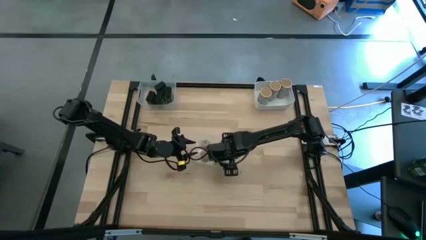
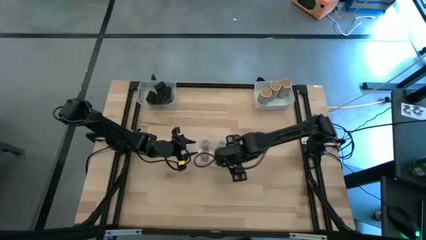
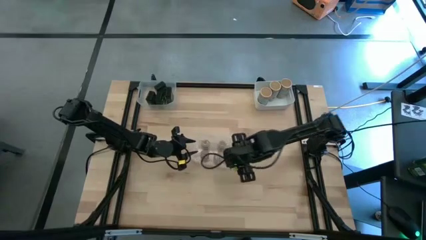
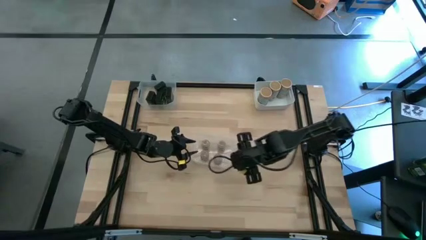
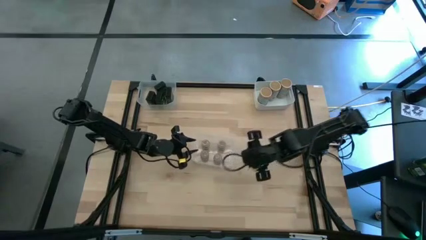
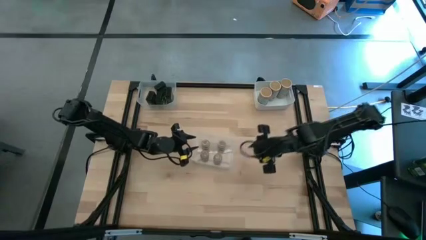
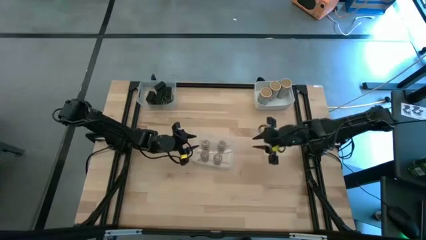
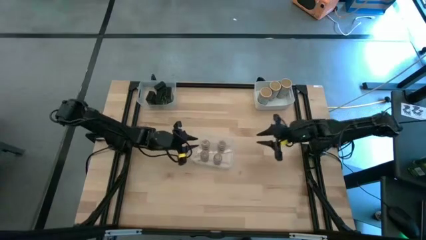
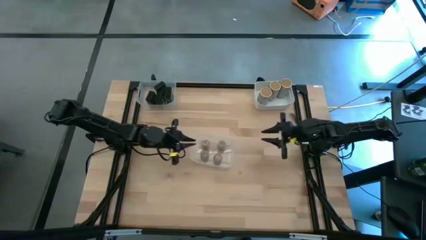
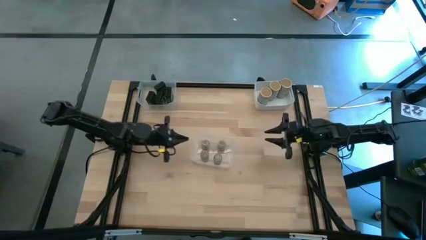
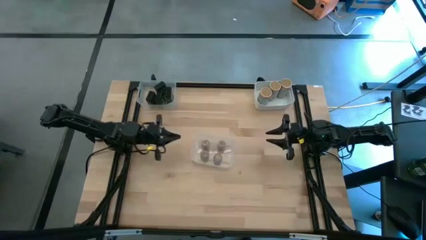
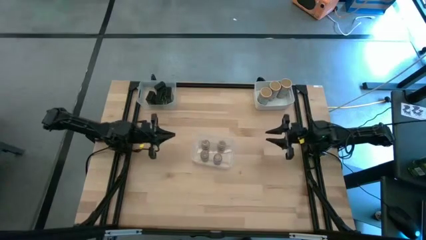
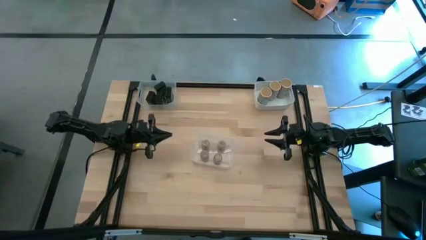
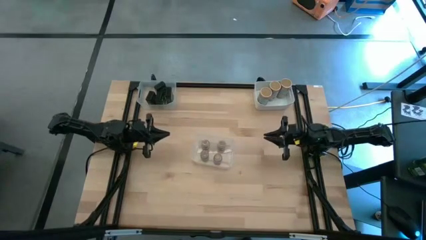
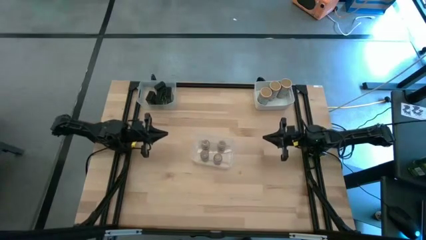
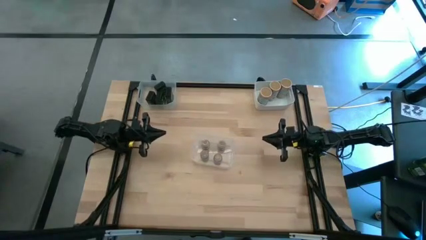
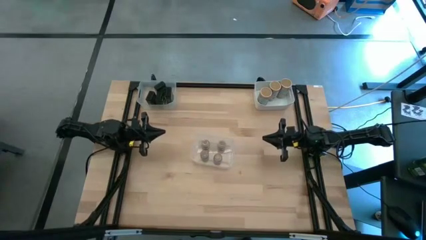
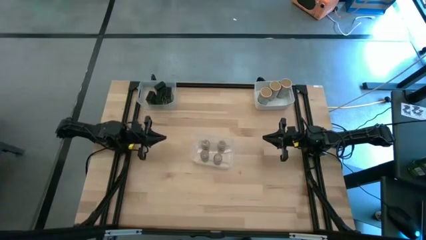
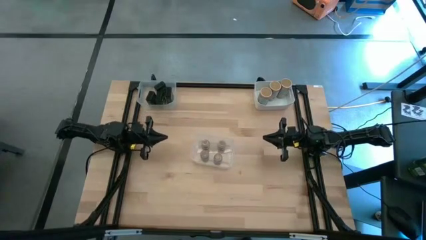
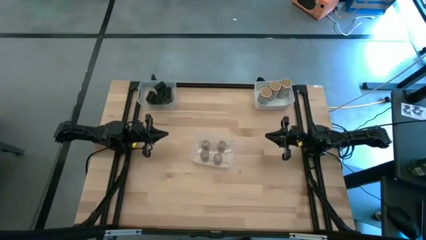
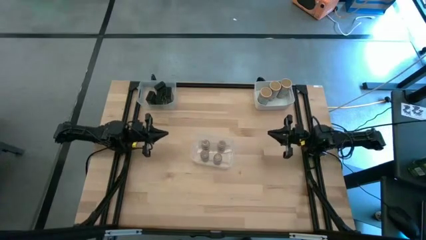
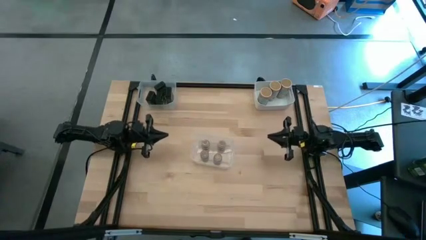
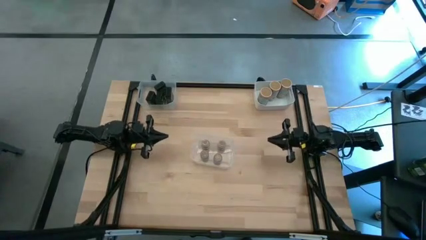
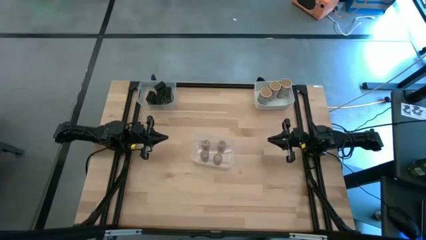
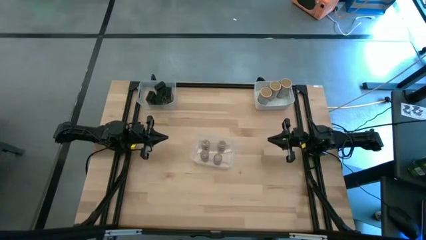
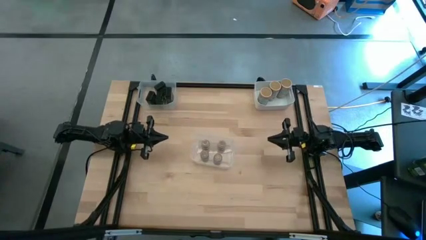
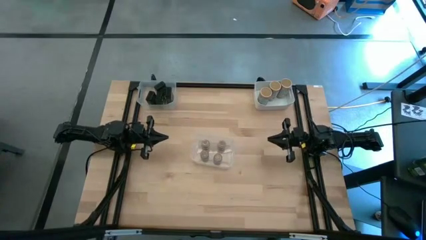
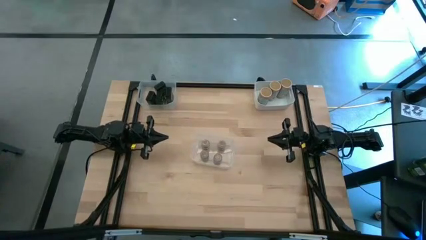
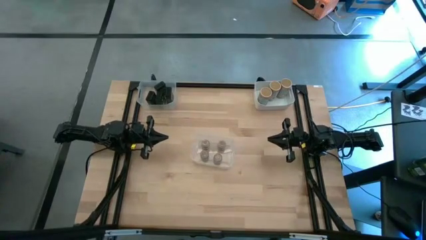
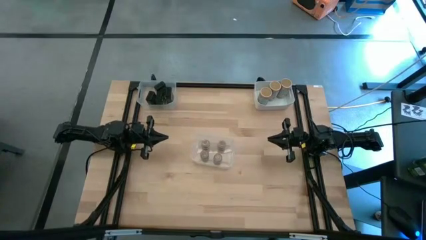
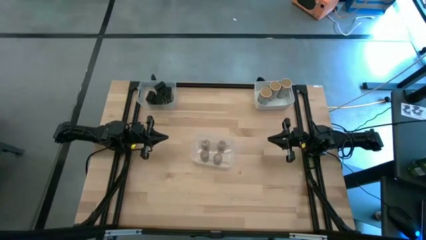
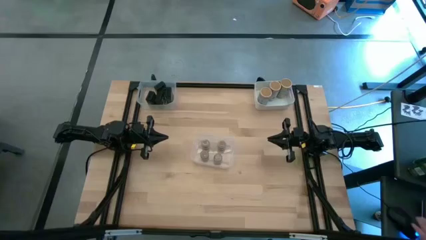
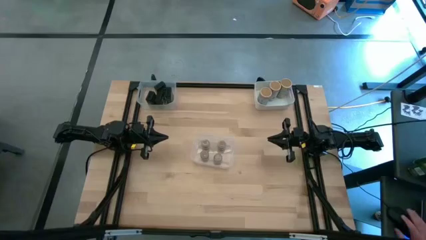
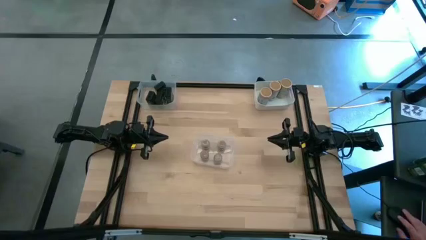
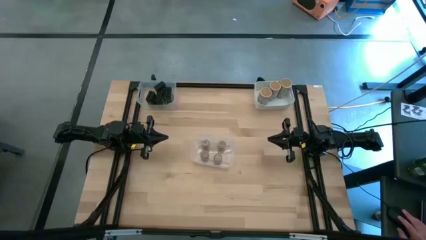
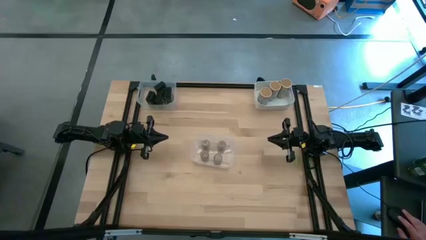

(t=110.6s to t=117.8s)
Task: Sort spices by type
Return to Home Position
